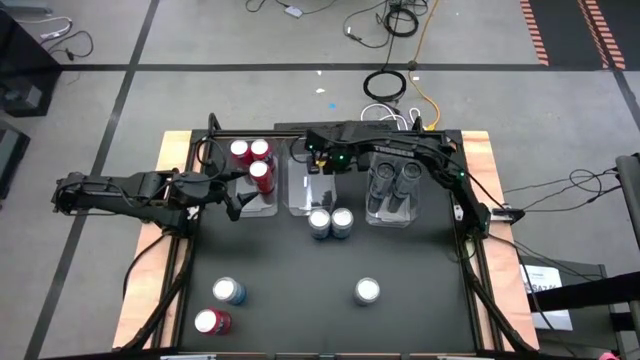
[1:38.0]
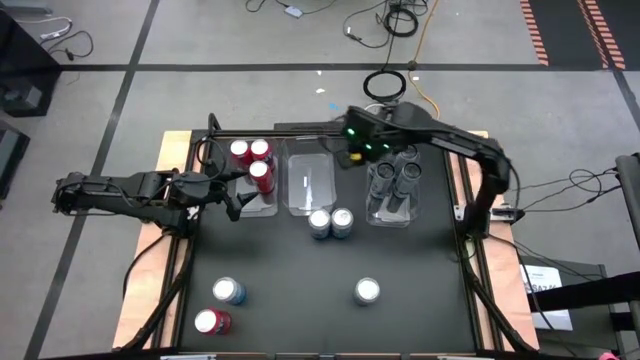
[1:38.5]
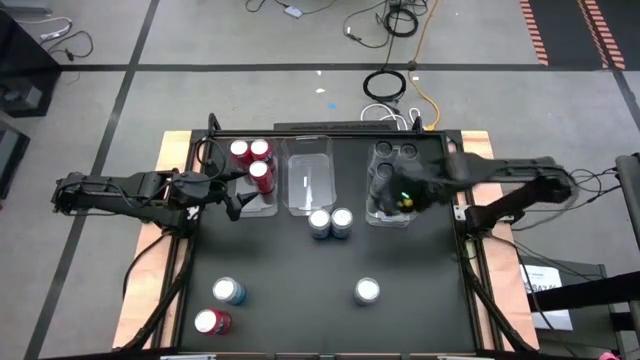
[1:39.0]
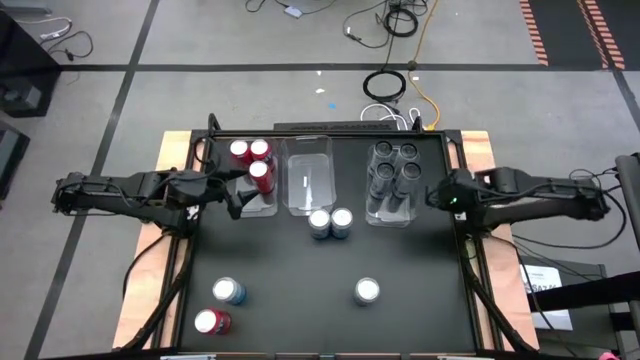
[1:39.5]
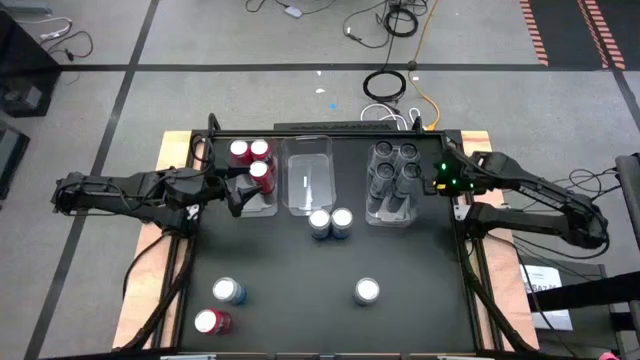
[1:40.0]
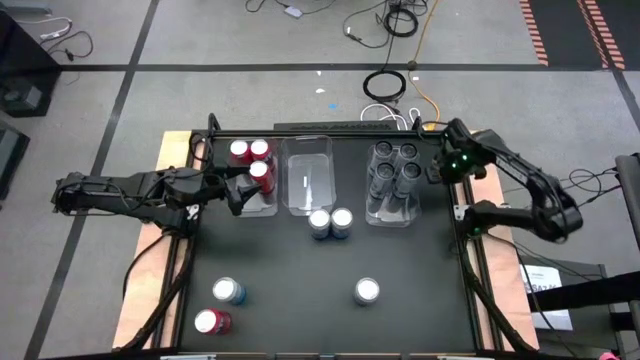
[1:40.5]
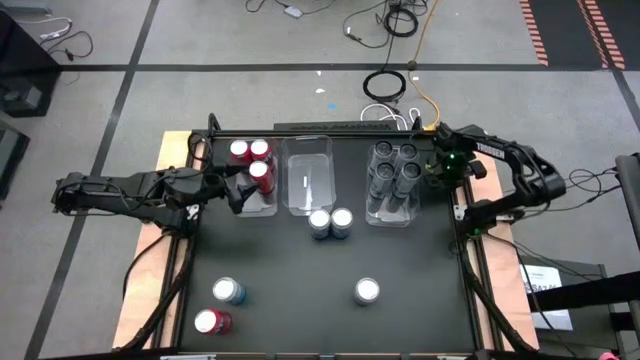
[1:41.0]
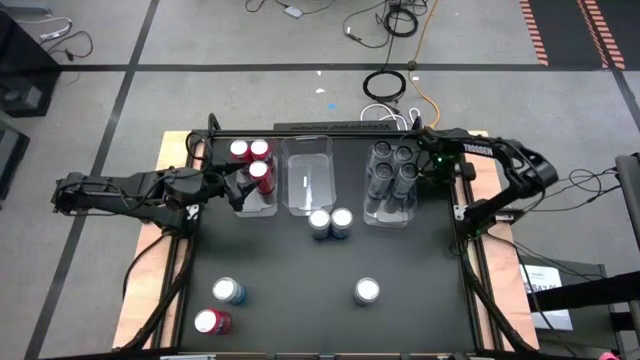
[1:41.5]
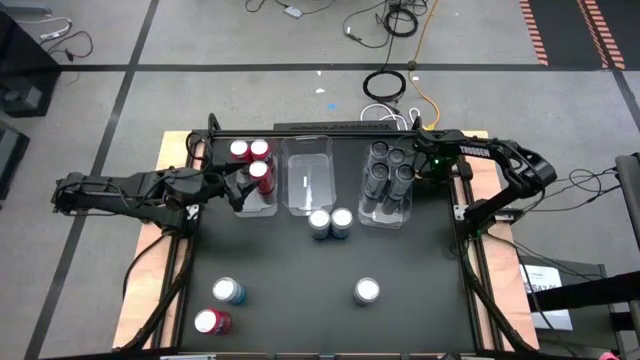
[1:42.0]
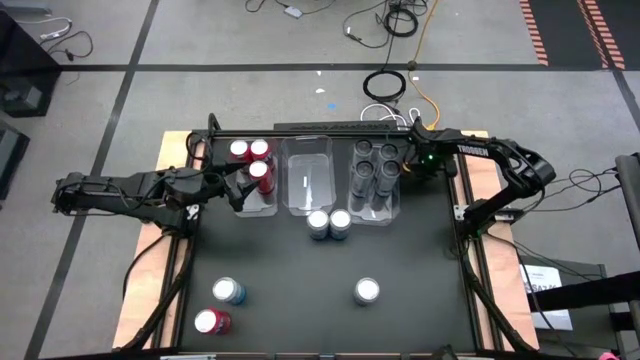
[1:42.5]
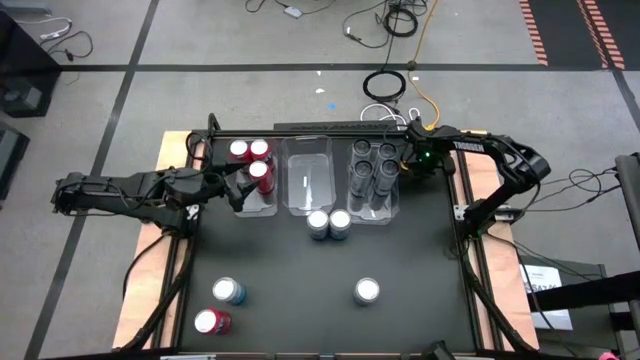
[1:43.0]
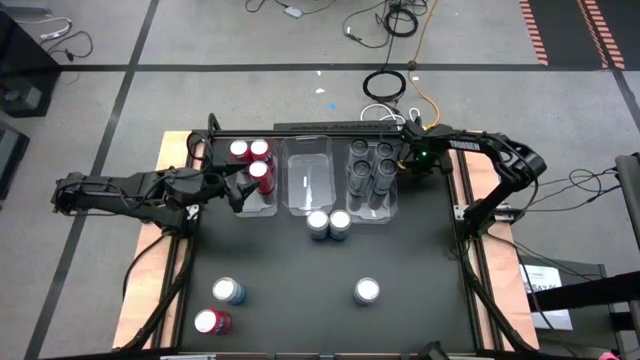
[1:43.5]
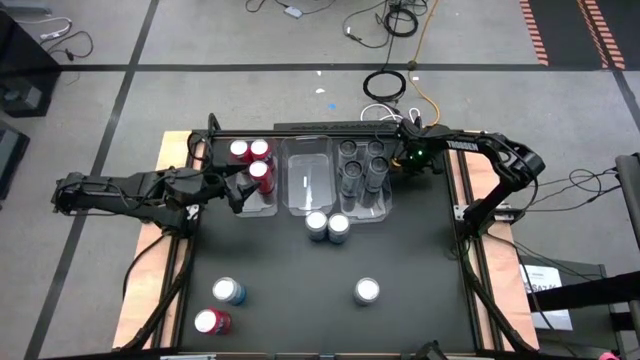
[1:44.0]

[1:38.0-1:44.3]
Task: Sort soda cans
Move the right transparent bin beside the middle transparent bin

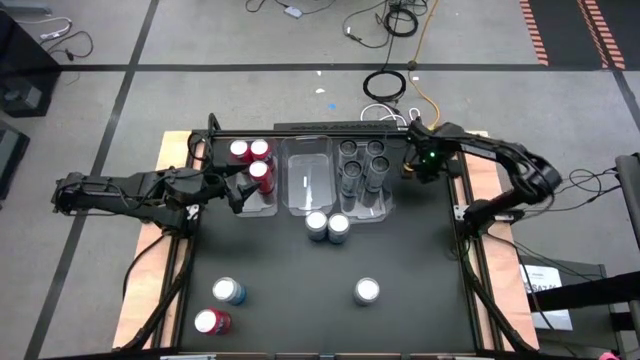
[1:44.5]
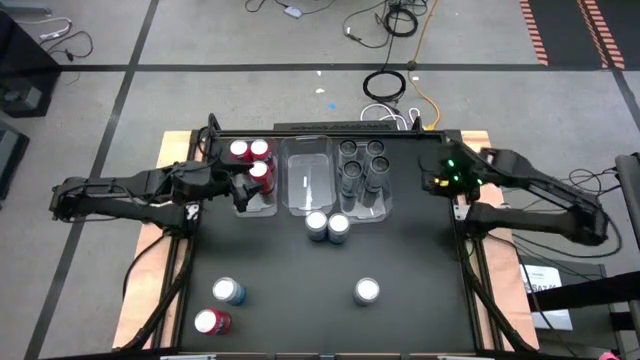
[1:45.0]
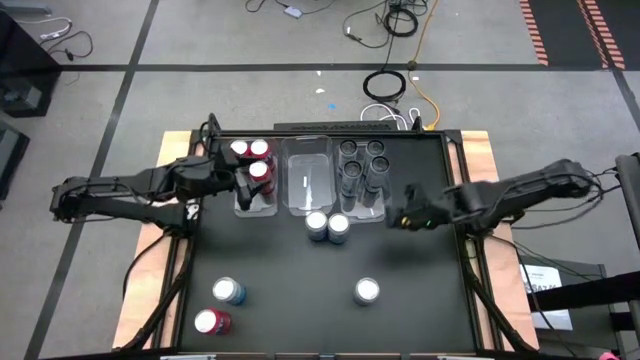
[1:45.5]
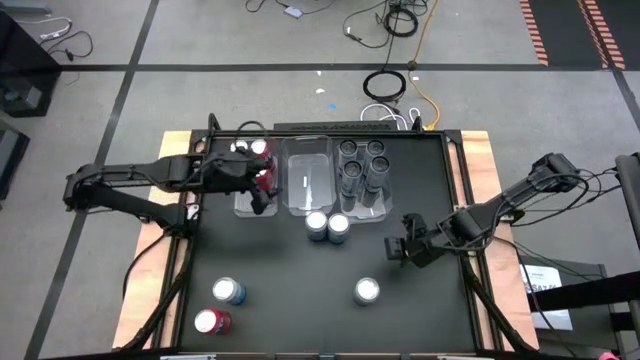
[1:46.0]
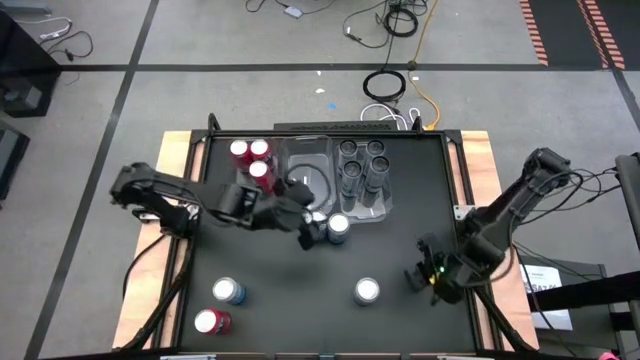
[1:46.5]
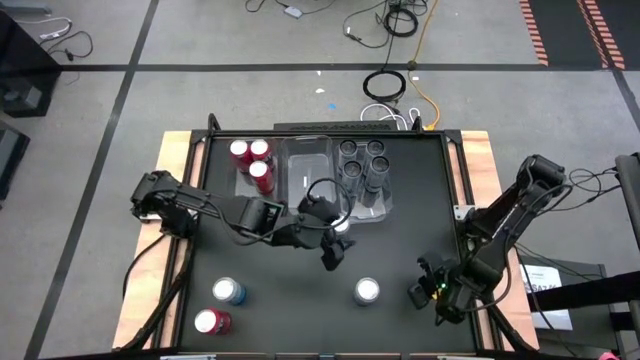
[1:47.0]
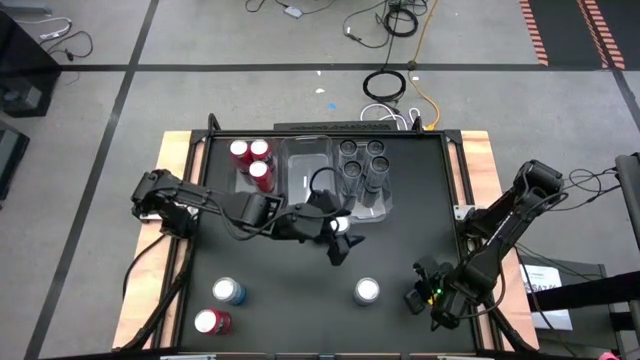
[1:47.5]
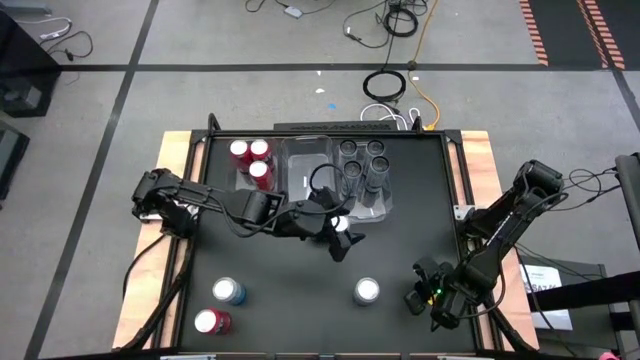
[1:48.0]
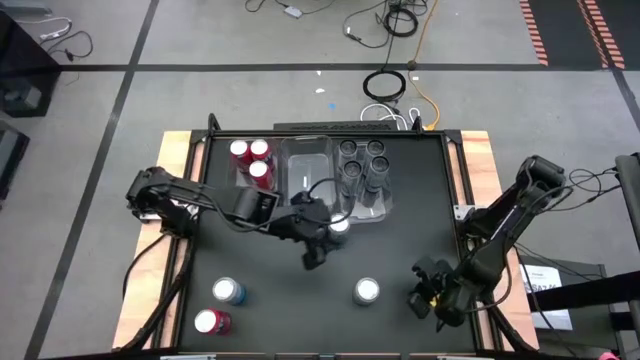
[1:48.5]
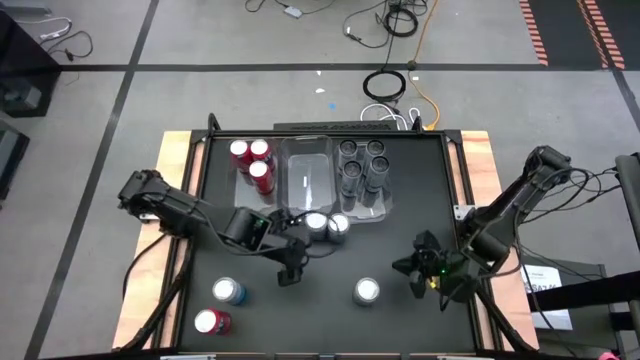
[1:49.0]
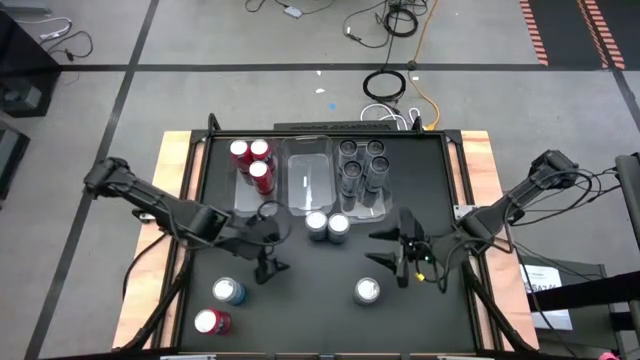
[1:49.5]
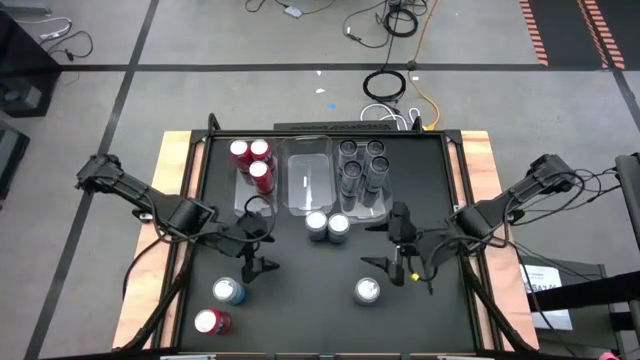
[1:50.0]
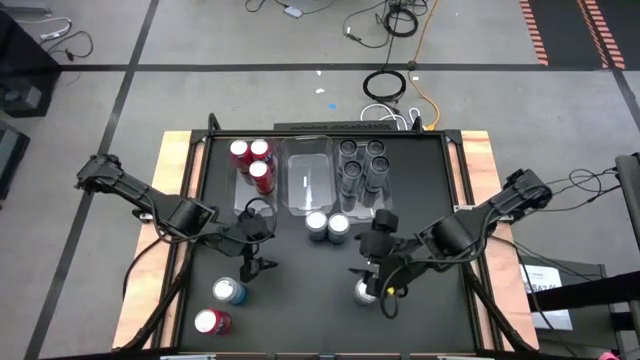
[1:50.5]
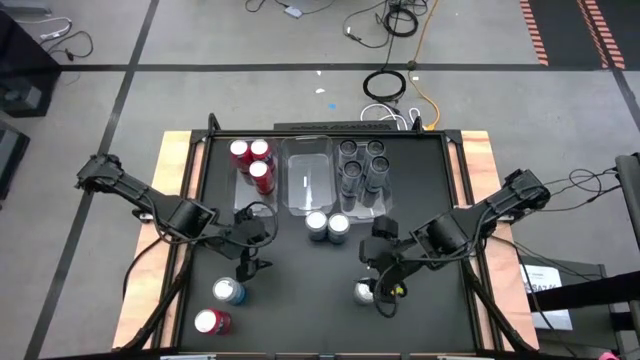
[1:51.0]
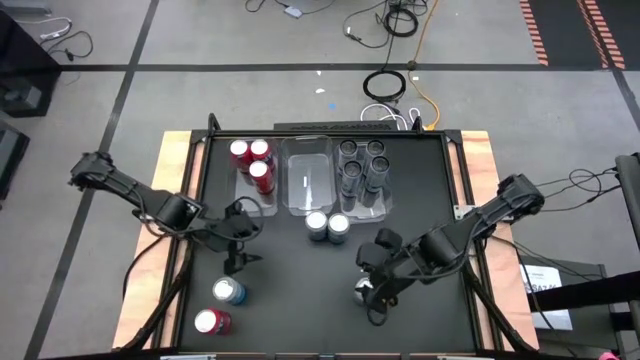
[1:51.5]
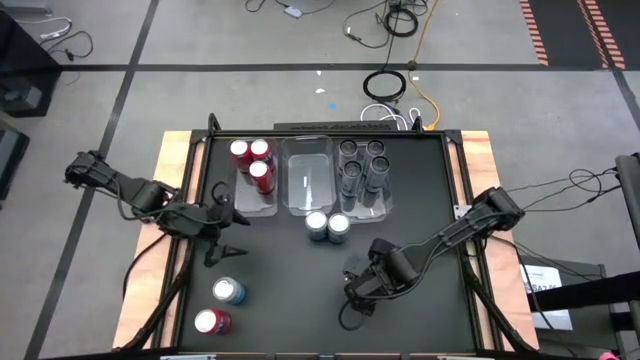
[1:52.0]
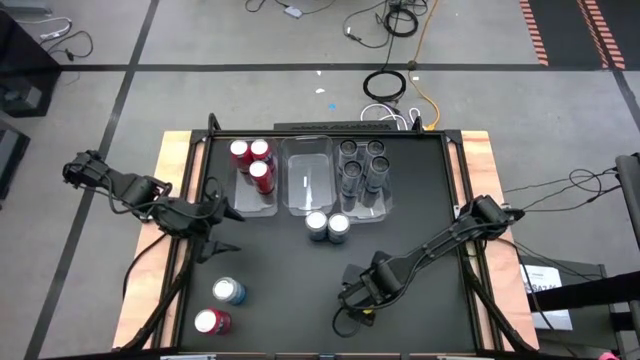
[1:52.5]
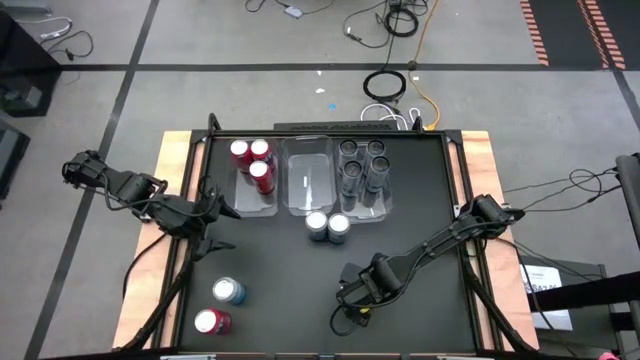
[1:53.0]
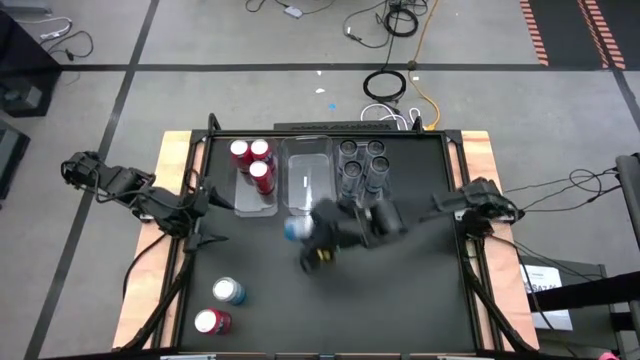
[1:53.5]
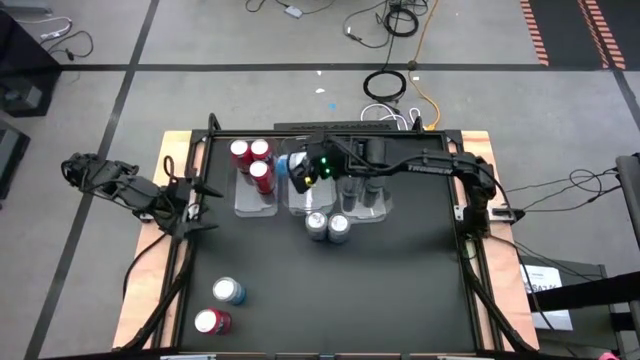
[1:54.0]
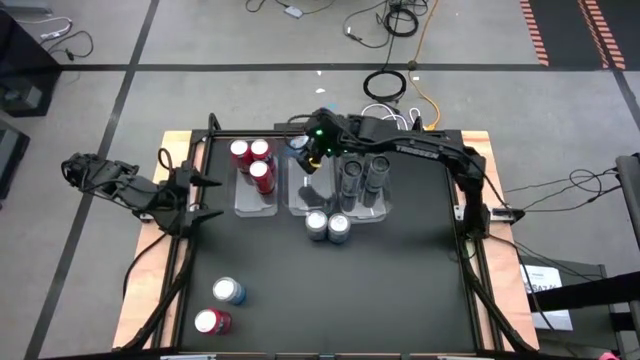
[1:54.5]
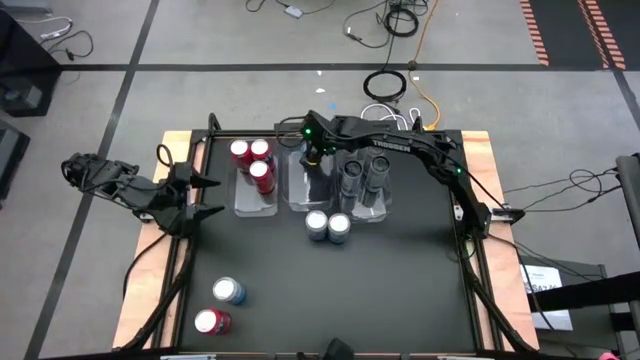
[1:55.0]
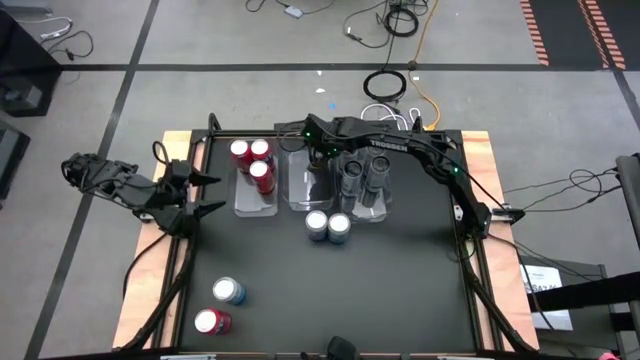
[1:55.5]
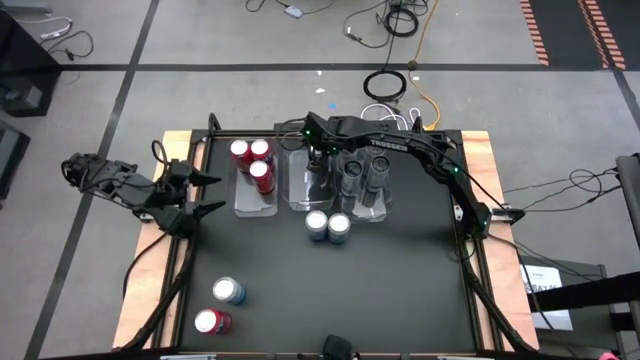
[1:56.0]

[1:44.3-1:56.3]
Put the blue and white soda can into the middle transparent bin

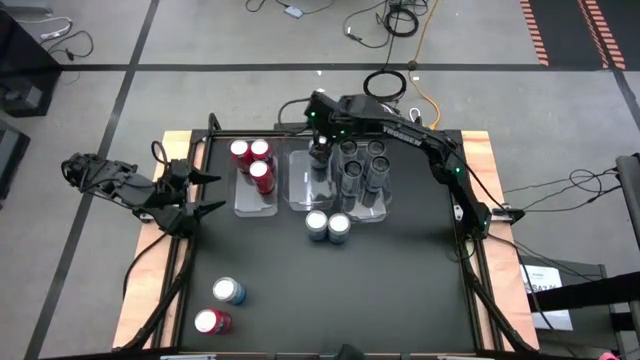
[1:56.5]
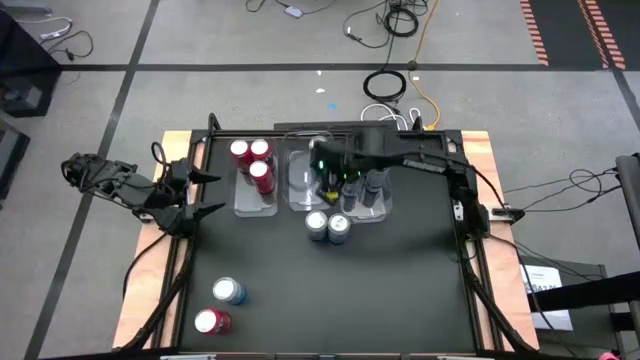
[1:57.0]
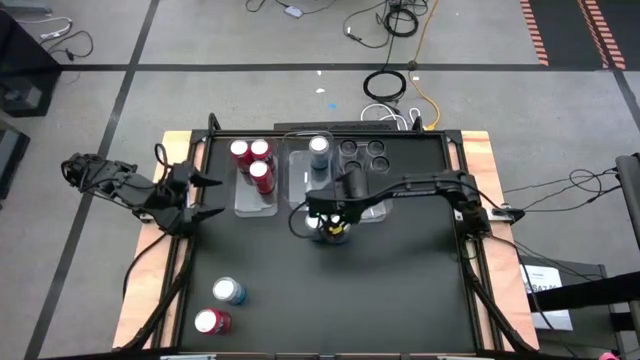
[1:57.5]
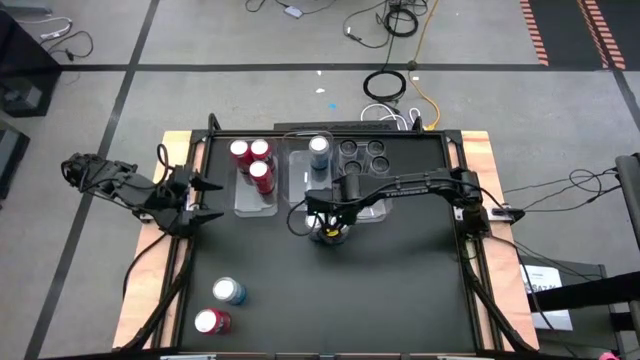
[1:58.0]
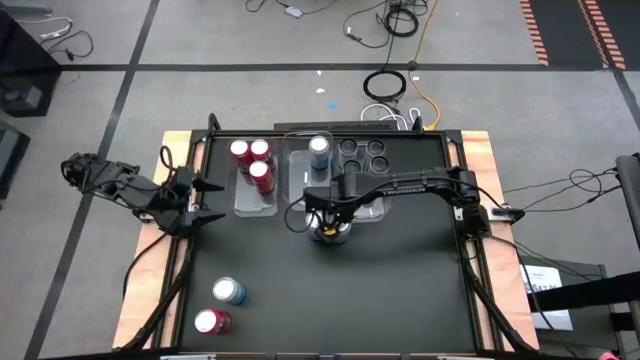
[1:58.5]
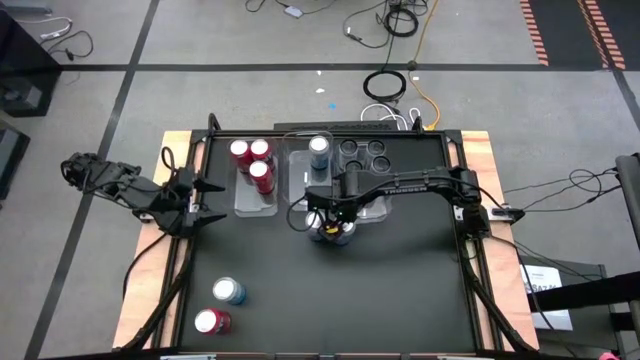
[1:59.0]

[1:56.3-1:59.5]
Put the blue and white soda can into the middle transparent bin
